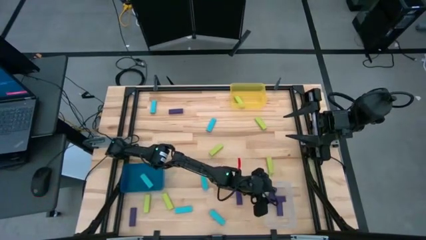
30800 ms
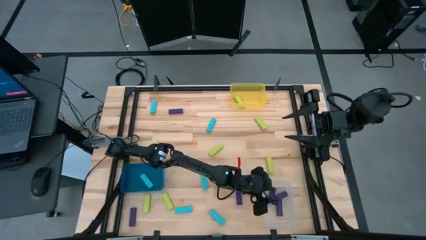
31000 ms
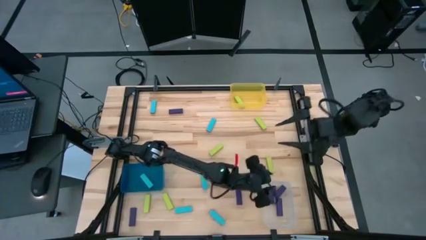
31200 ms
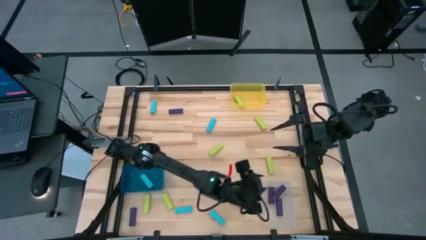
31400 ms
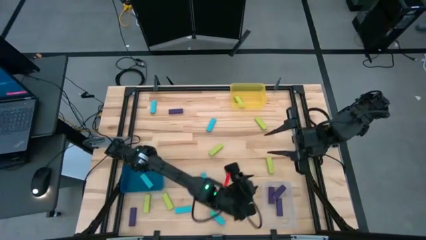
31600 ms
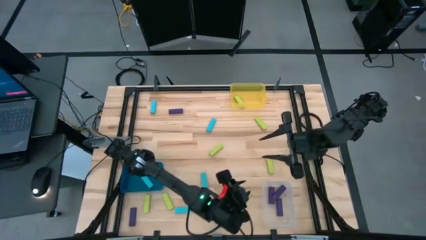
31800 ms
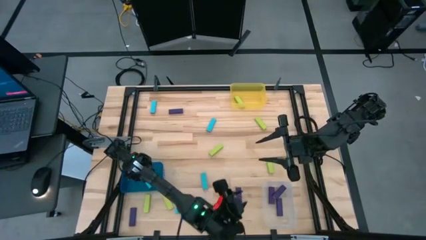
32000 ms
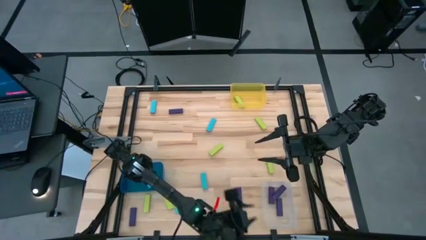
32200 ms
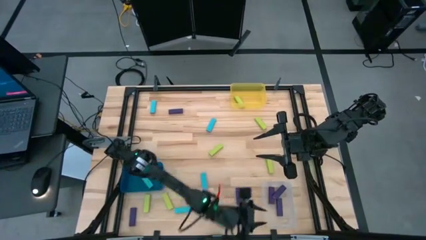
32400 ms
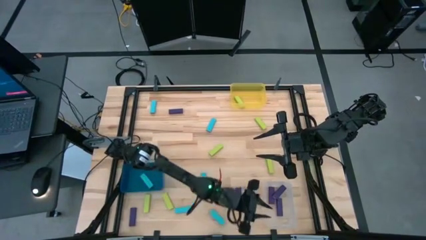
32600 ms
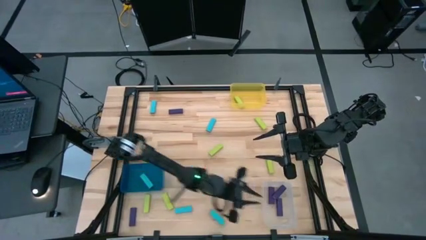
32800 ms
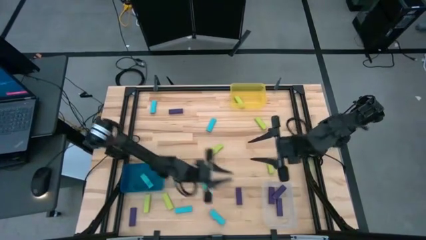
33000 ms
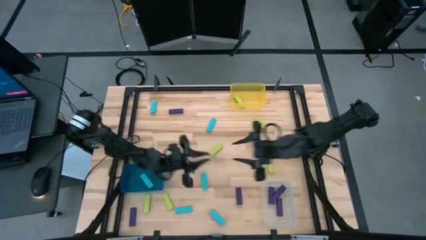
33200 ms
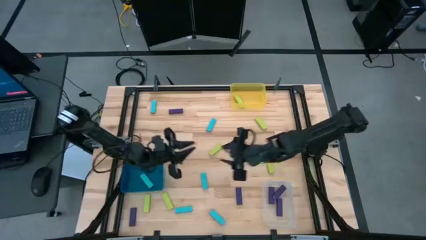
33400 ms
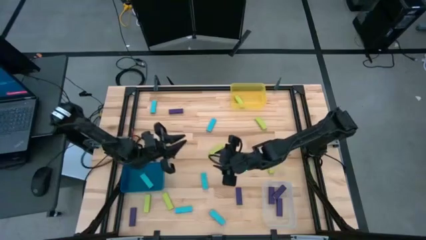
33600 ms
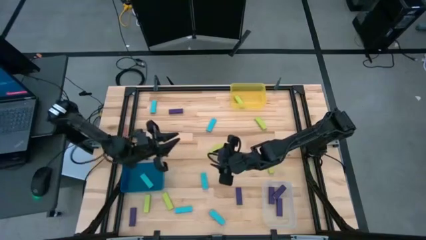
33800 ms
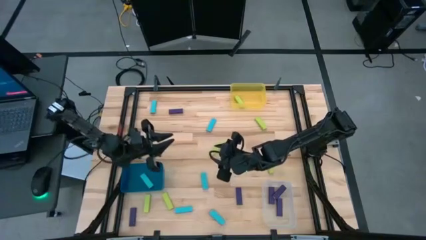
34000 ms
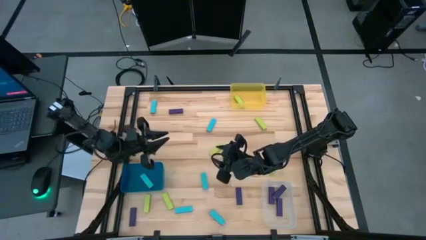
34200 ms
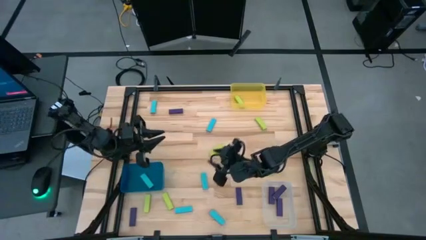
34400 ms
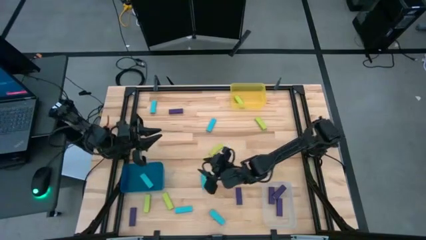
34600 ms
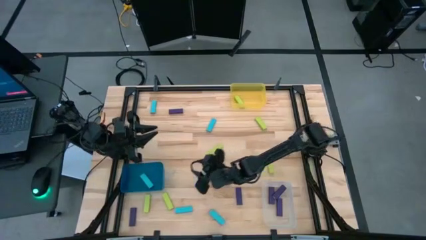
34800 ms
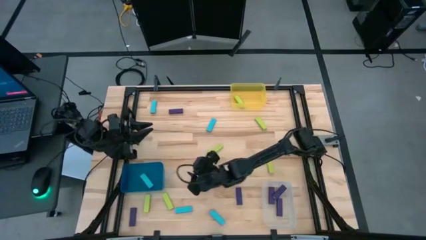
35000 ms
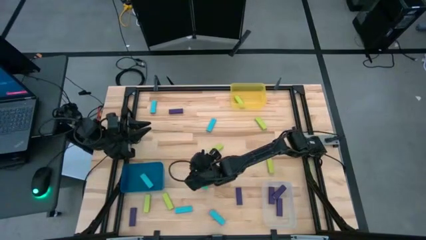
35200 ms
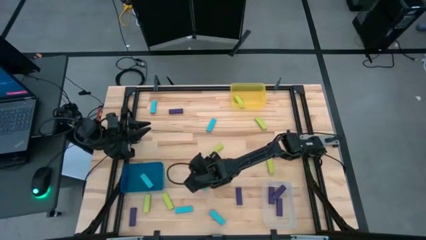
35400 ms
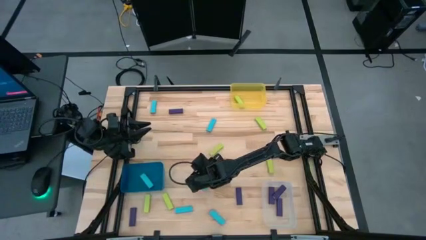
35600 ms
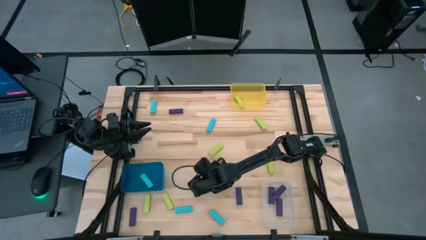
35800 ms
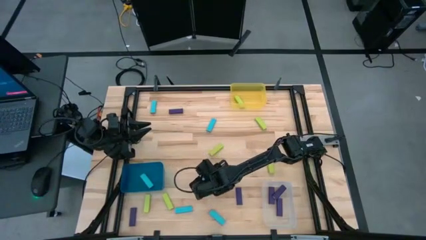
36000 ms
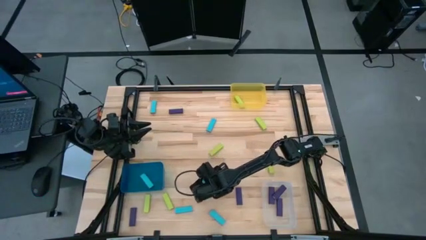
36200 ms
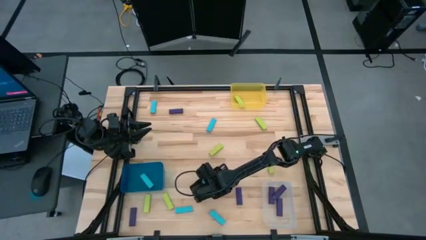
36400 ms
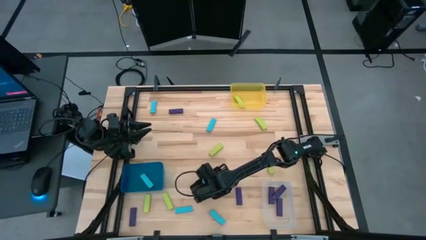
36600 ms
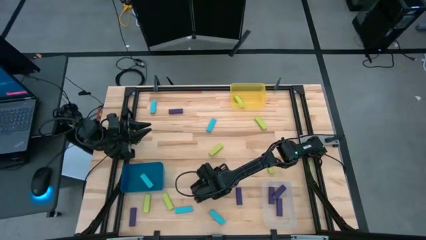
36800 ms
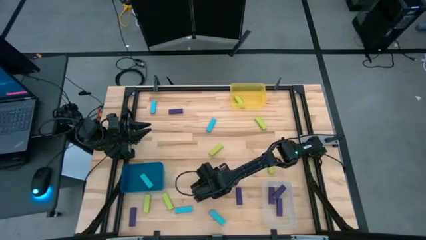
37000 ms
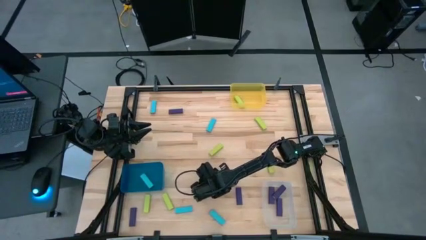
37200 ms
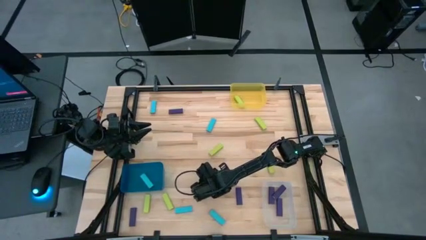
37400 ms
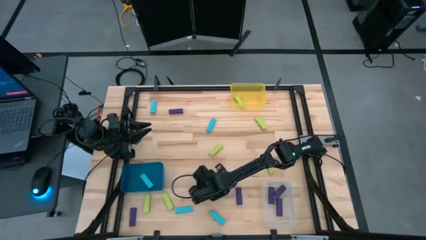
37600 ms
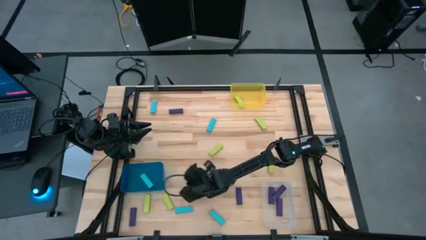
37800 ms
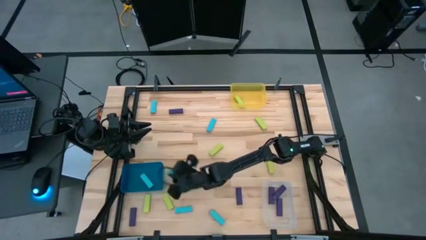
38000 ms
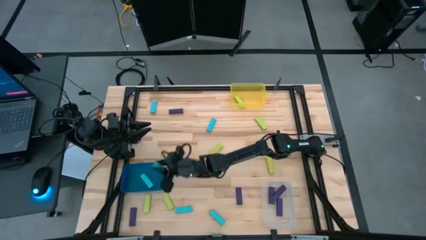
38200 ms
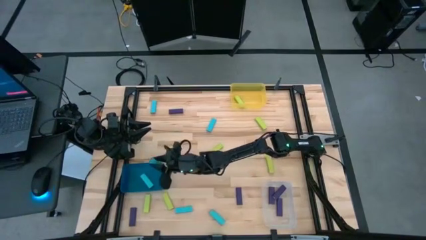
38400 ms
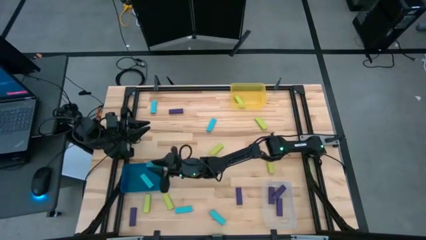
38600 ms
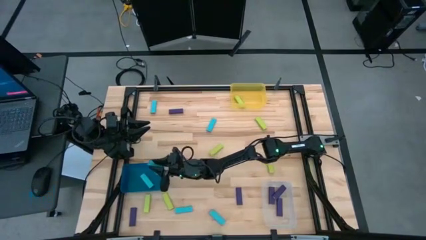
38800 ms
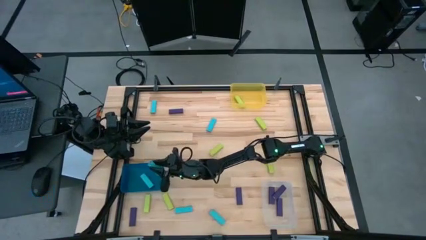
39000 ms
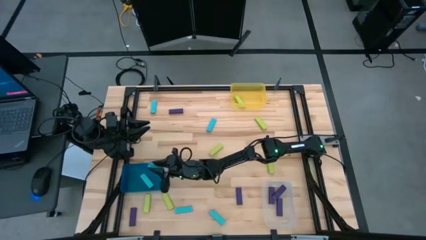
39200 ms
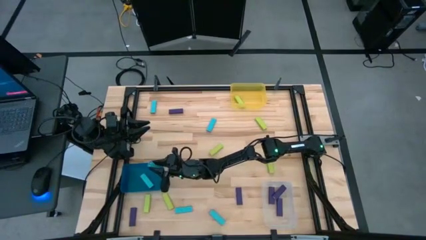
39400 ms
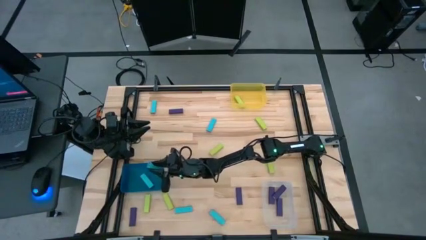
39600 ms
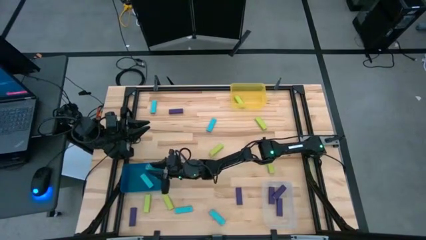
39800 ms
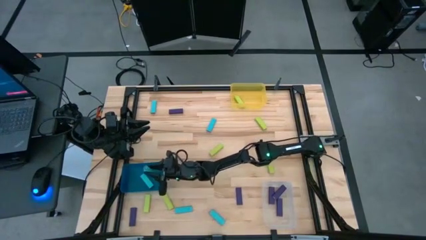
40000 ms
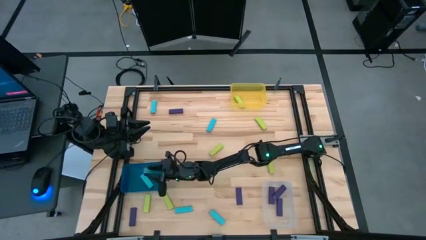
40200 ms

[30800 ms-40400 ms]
Task: Sort blocks
Put the blue block into the dark blue bin

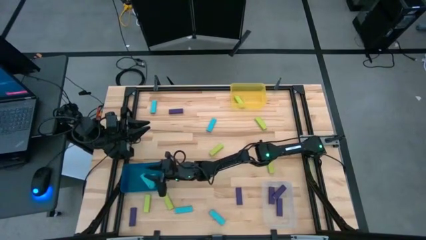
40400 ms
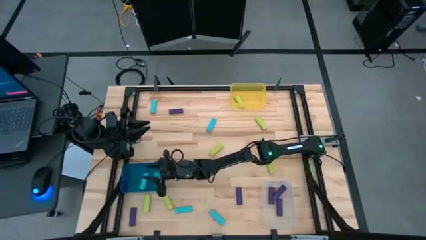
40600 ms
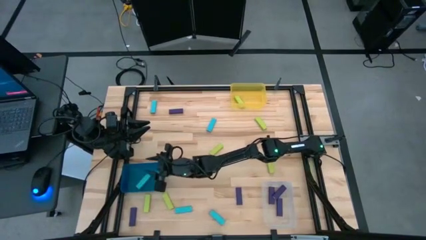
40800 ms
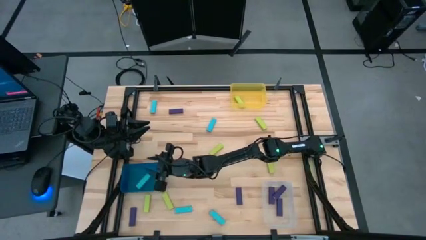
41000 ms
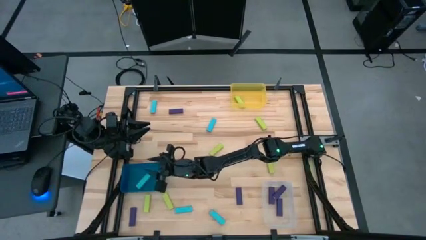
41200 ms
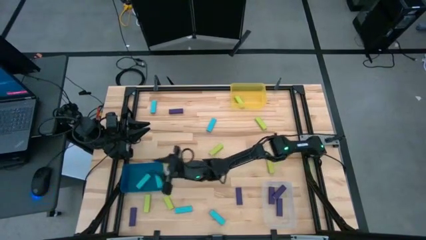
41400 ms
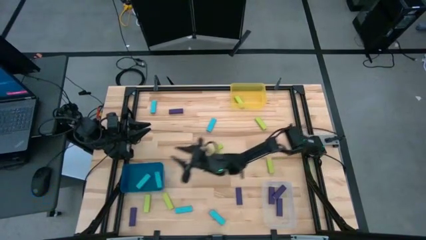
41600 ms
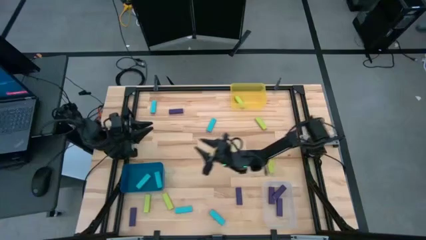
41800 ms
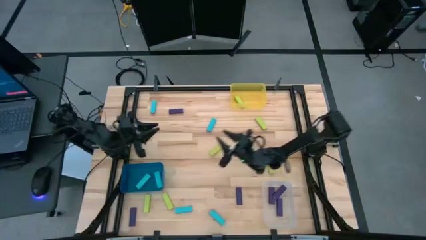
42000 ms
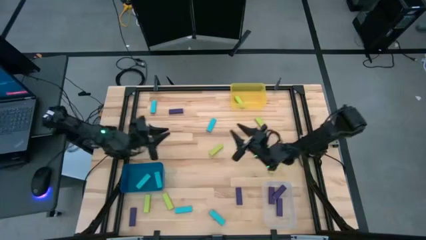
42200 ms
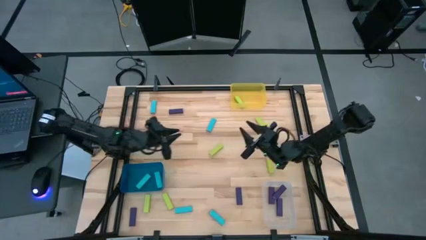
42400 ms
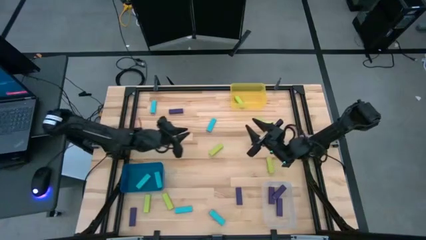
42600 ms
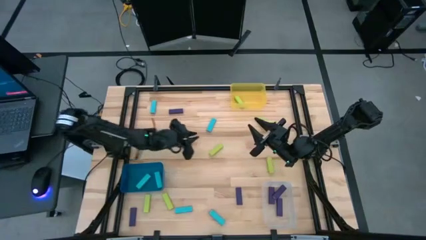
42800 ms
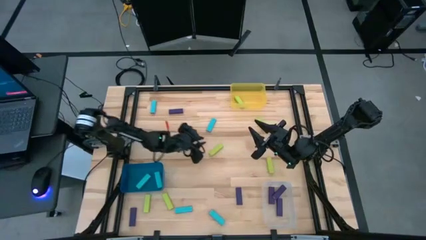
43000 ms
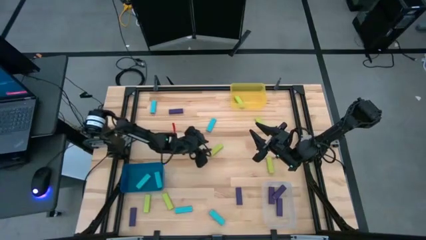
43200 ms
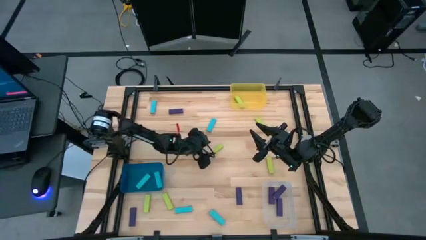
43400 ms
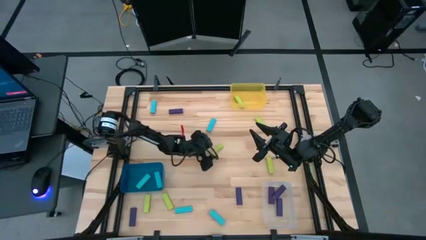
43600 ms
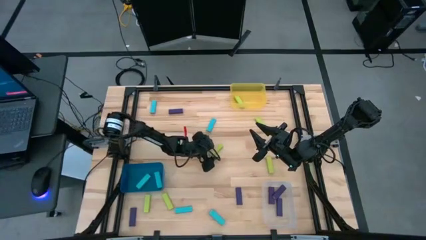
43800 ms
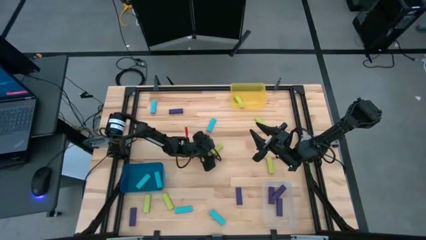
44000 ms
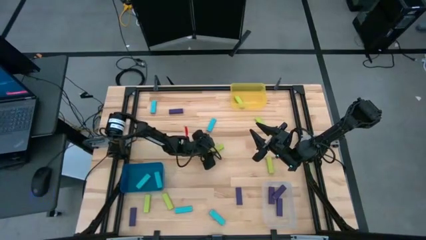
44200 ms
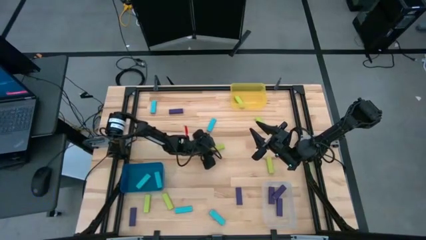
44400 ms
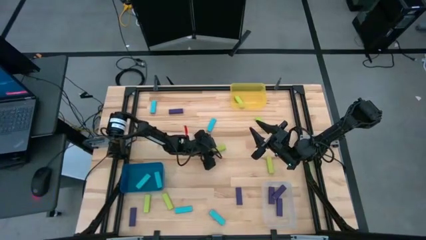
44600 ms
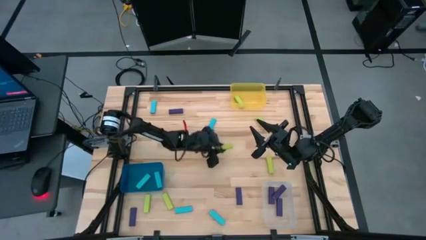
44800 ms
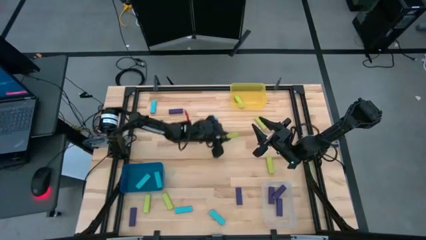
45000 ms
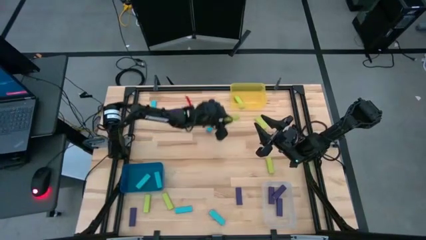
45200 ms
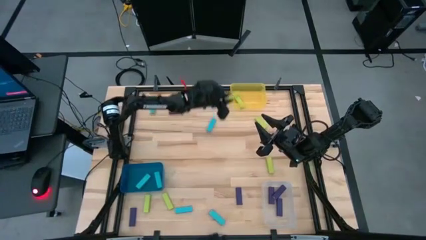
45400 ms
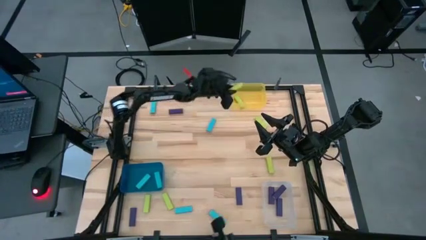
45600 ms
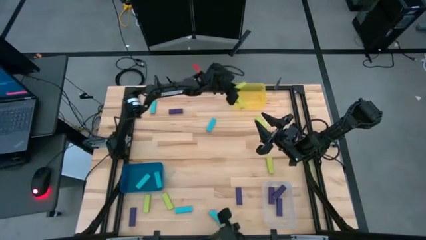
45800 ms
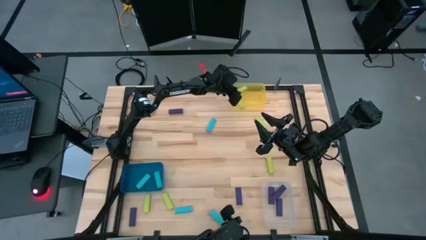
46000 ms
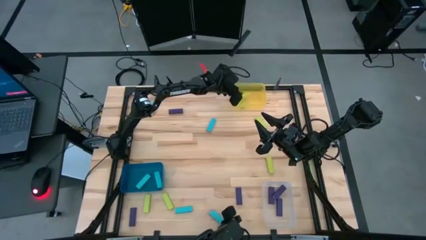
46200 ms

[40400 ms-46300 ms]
Put the green block into the yellow bin

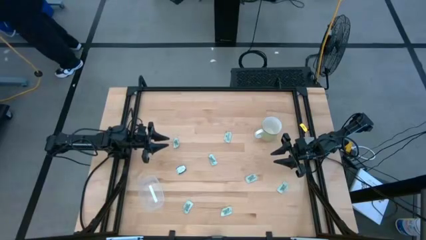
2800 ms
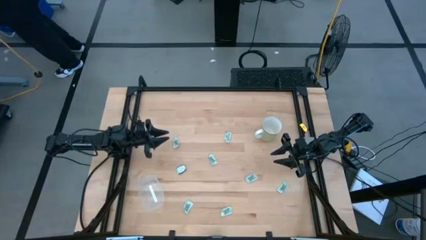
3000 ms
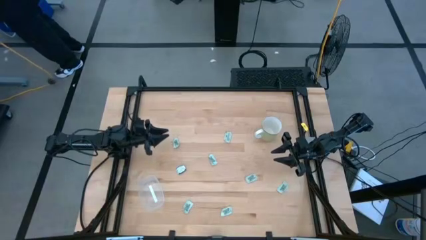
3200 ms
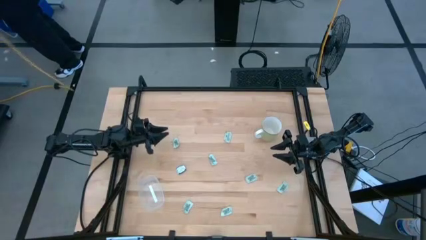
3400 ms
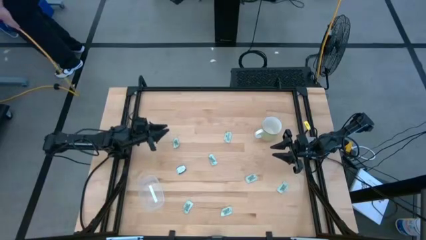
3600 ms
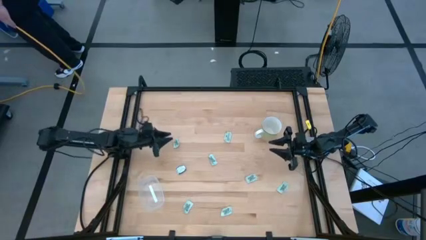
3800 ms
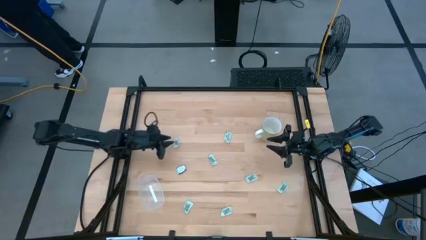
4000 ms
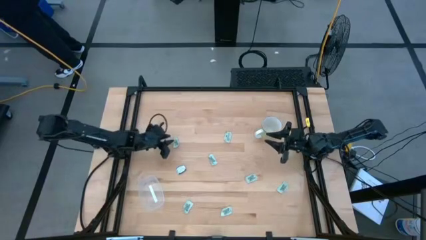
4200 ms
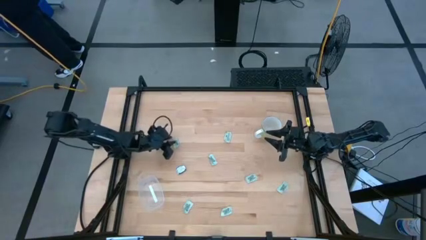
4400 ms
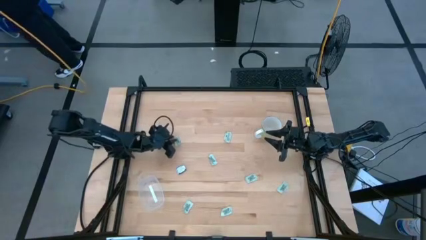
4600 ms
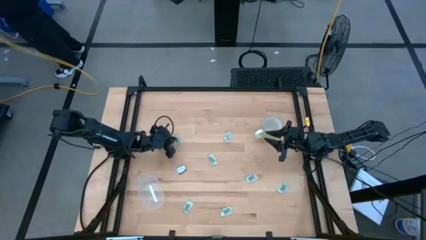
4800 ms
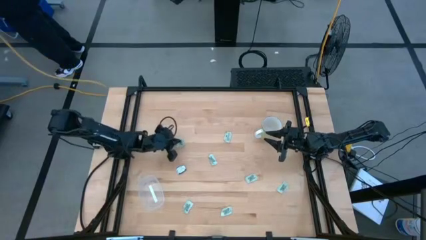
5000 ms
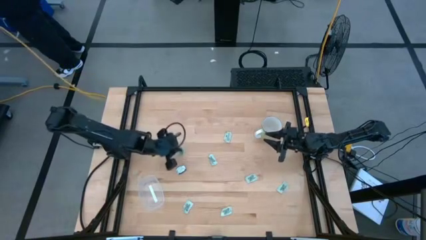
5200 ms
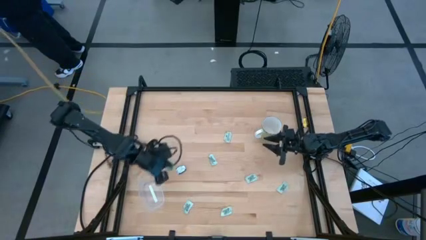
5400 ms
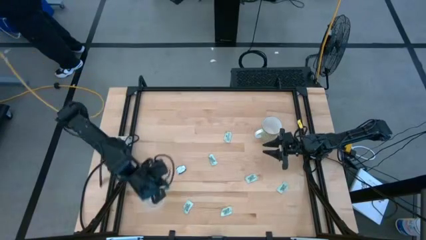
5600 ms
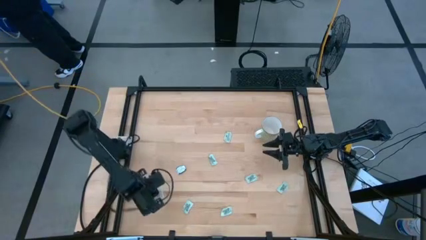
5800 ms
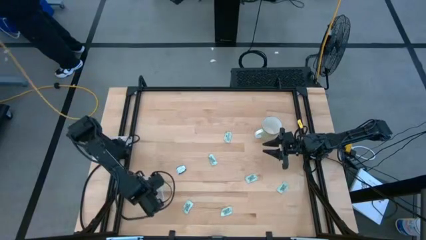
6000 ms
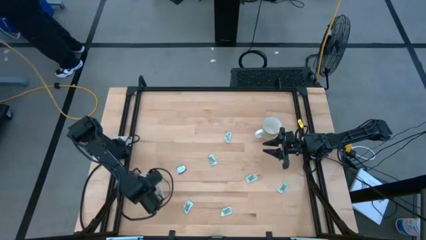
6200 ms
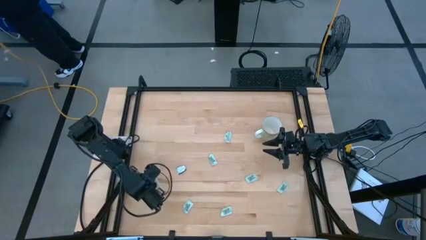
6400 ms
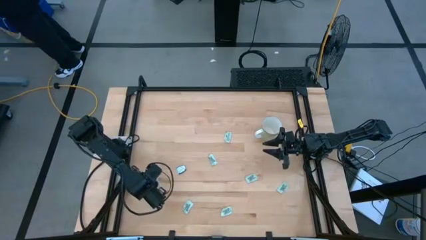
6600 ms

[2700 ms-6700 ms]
Task: Pick and place Stevia / Truvia into bins
Put the stevia packet into the transparent bin
